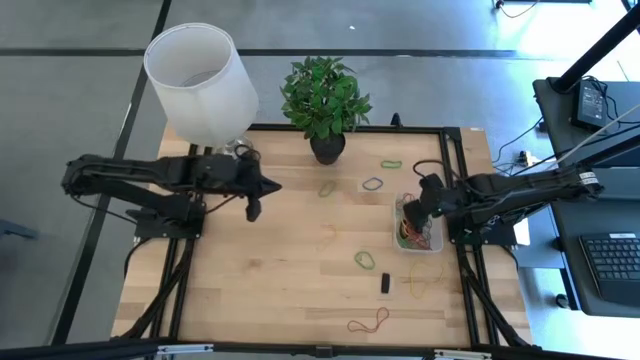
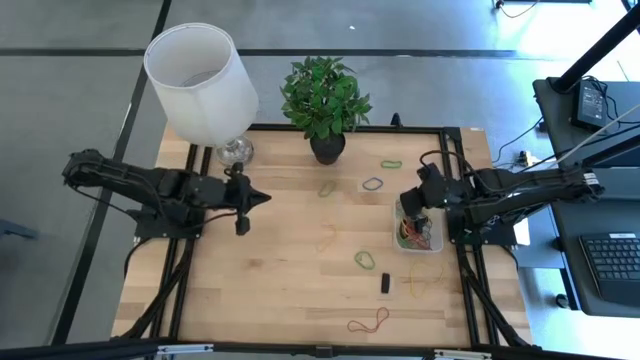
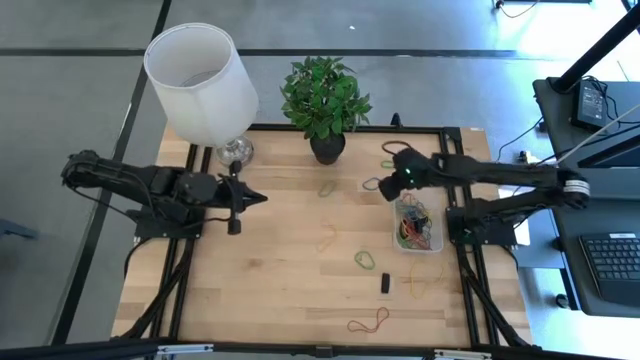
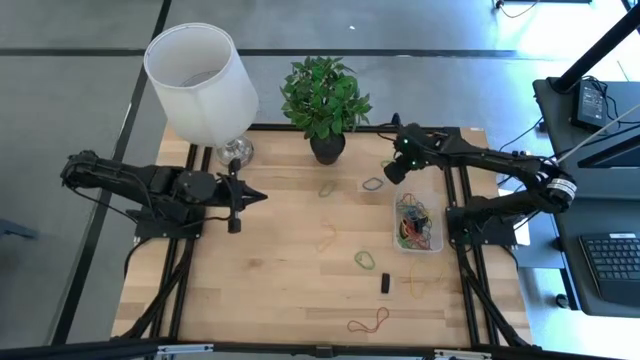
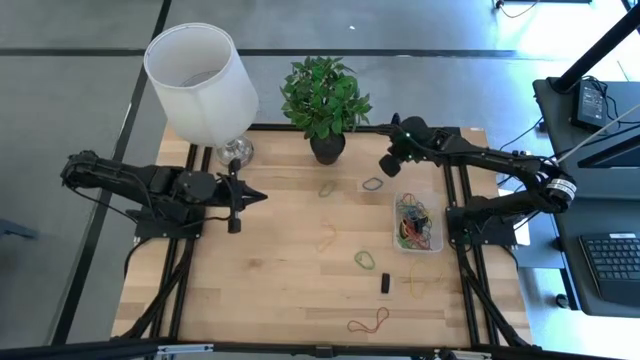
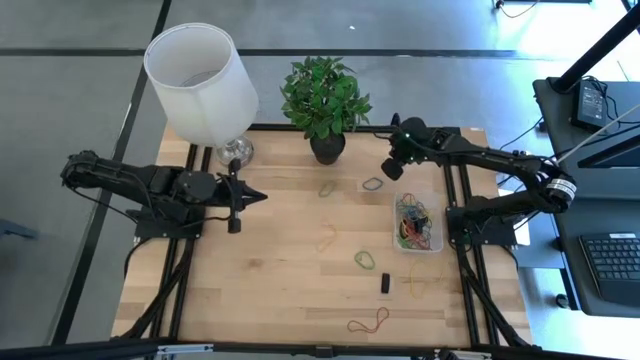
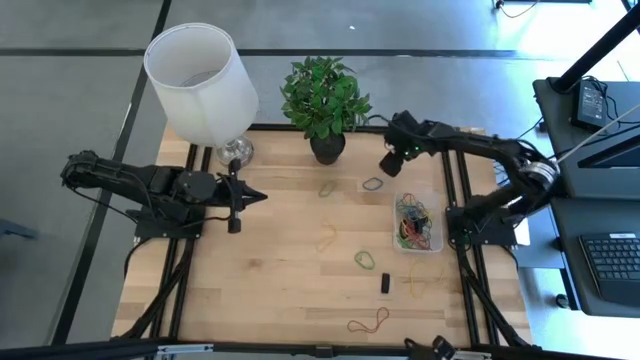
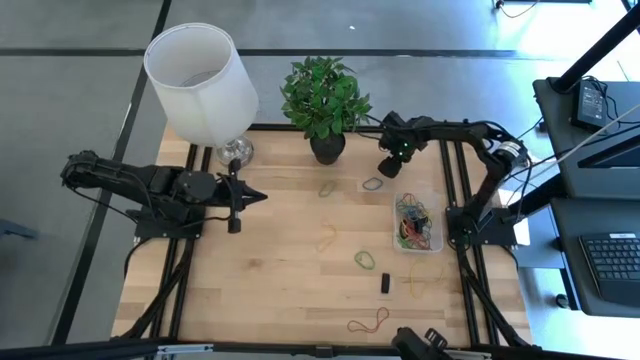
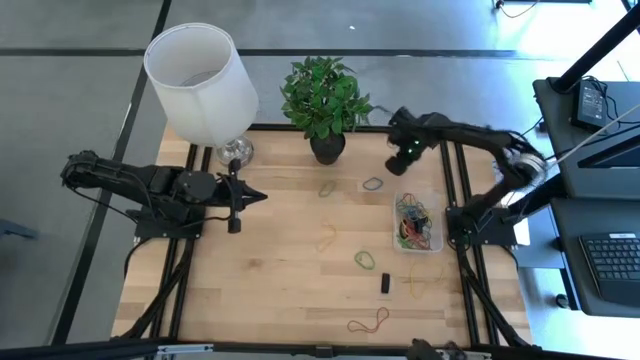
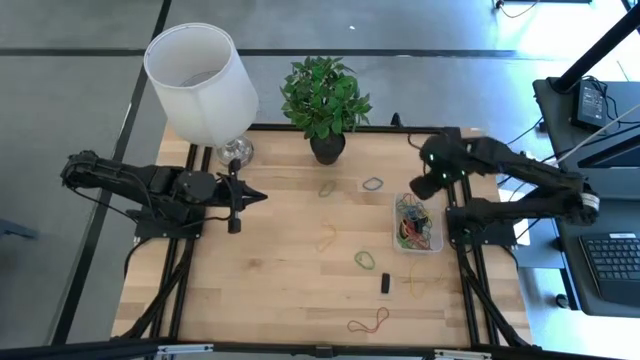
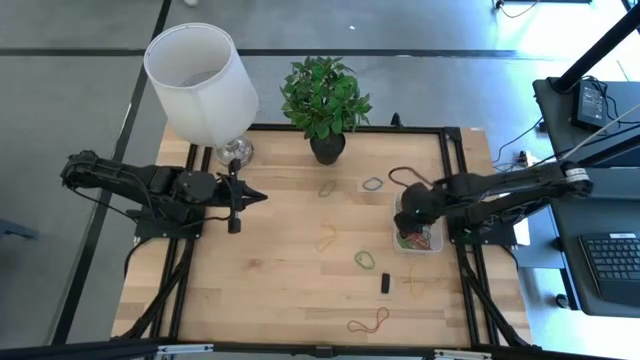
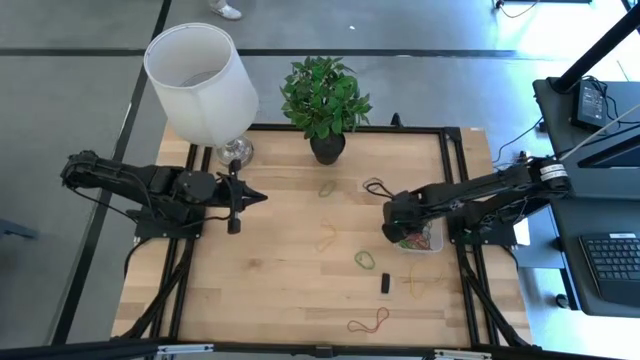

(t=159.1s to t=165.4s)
Task: Pick and place rubber bands into bin
Put the green rubber band into the transparent bin

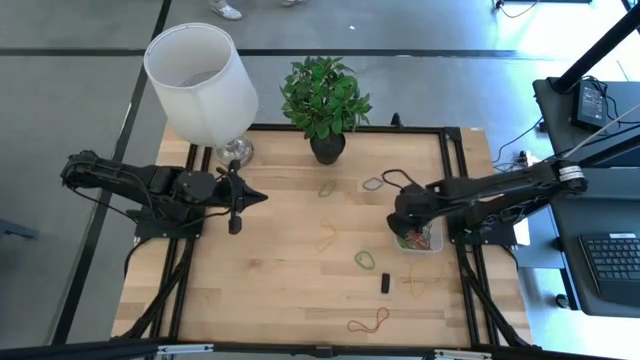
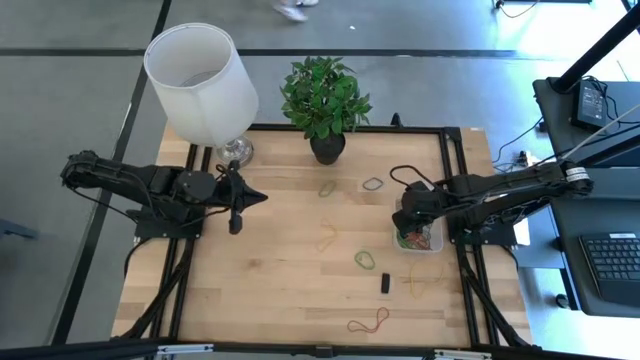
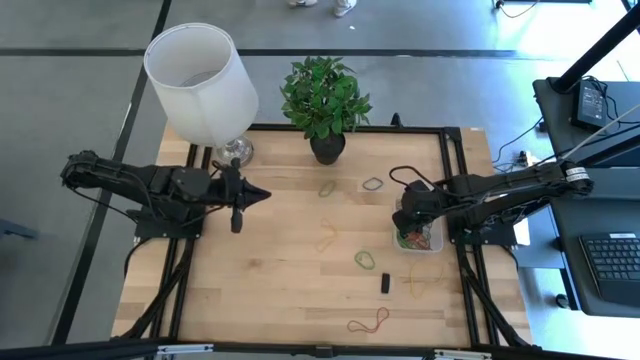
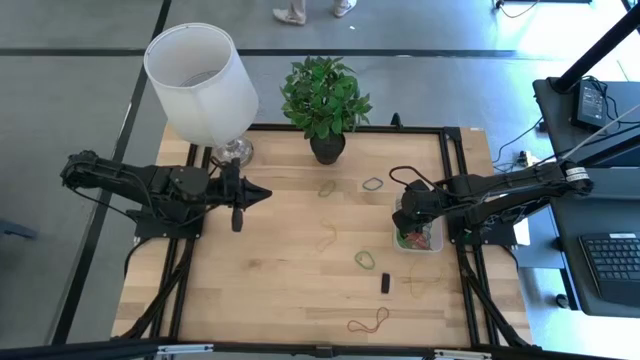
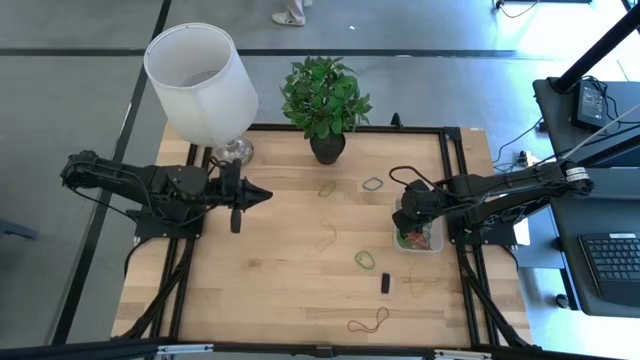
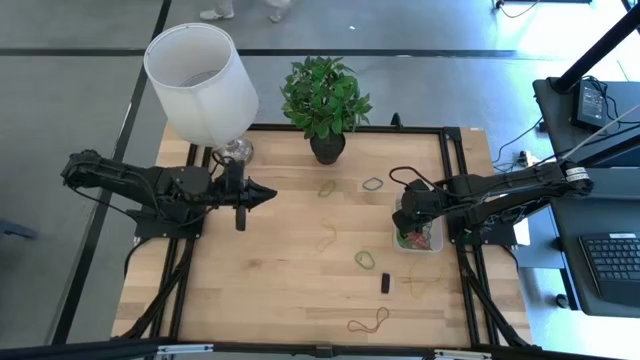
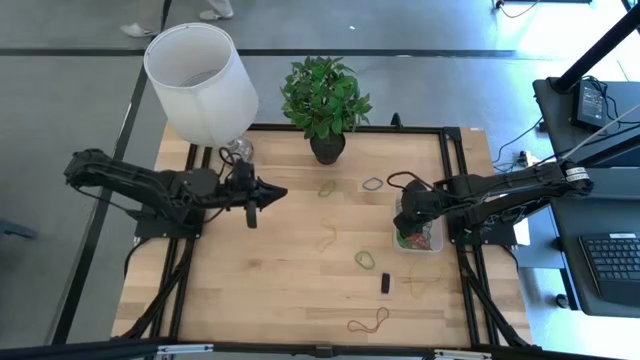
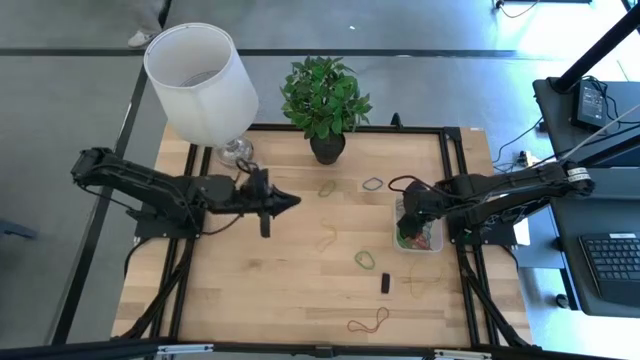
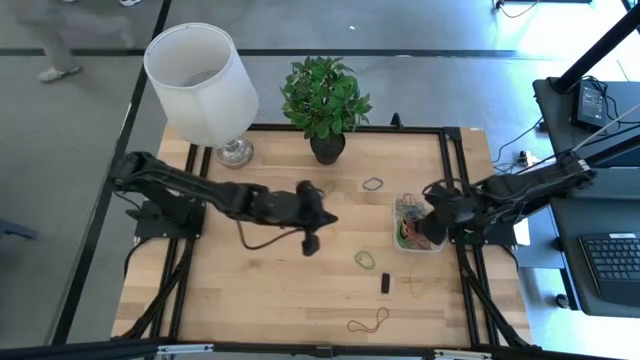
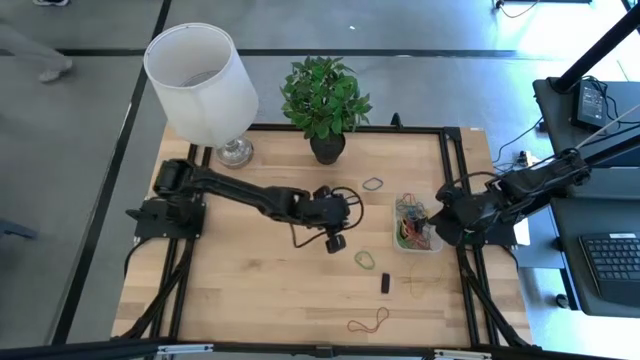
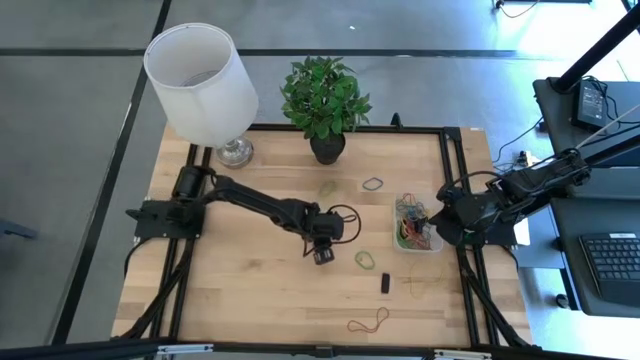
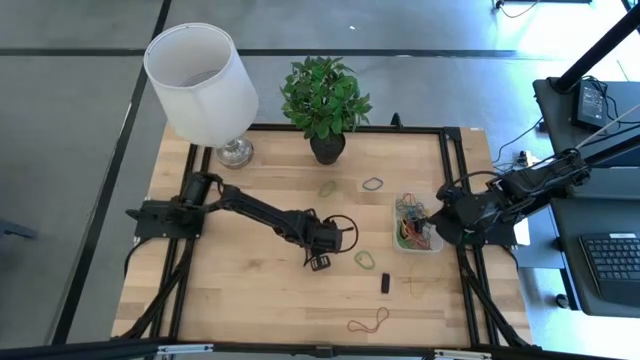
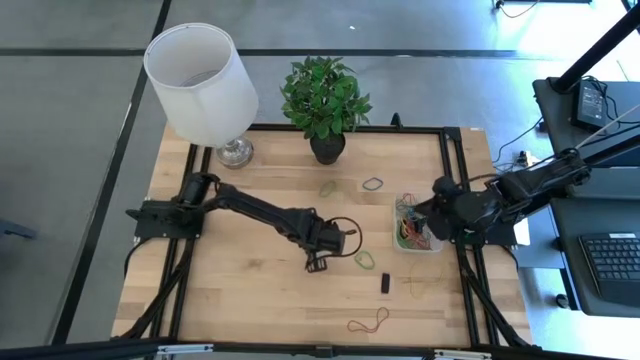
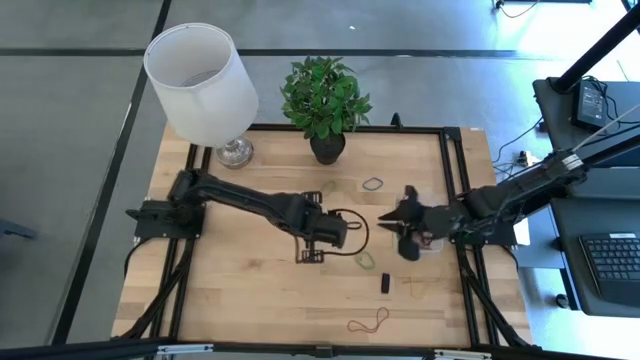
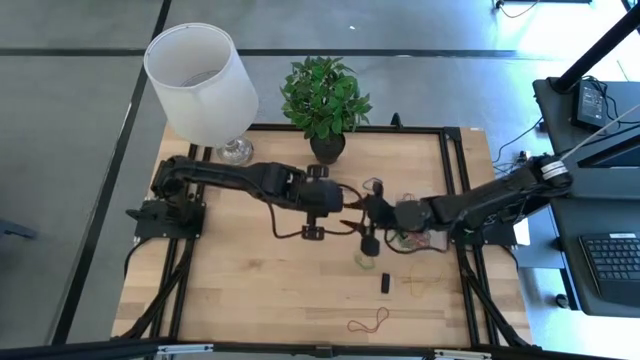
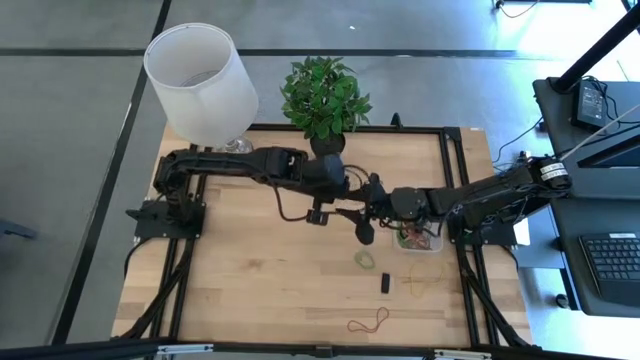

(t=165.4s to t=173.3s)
Put the yellow rubber band into the transparent bin

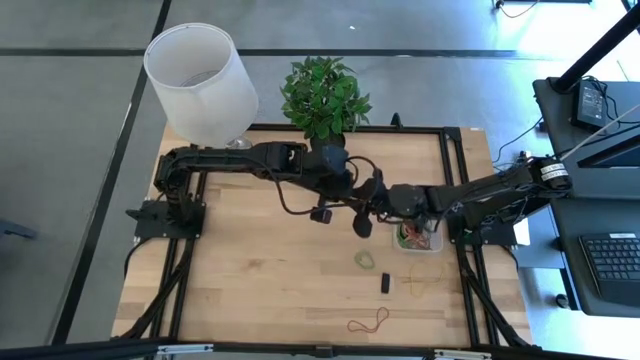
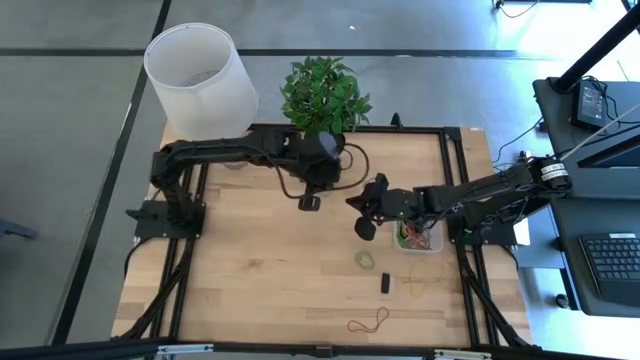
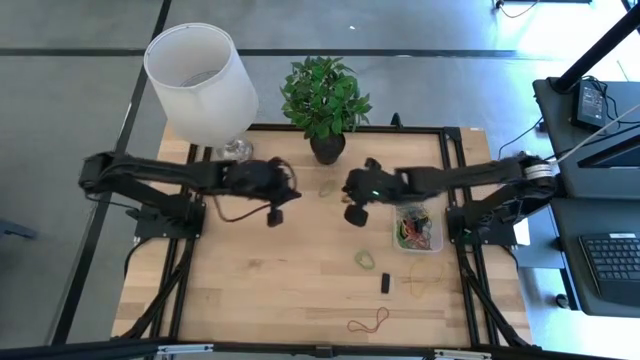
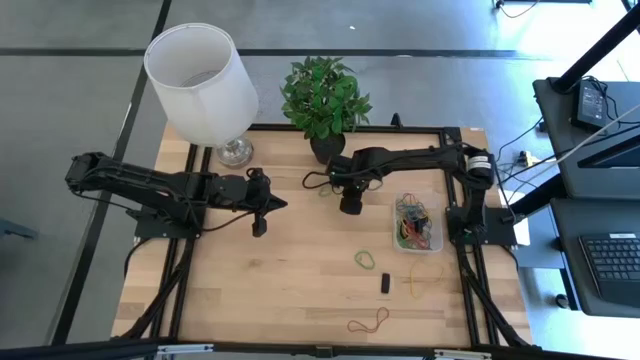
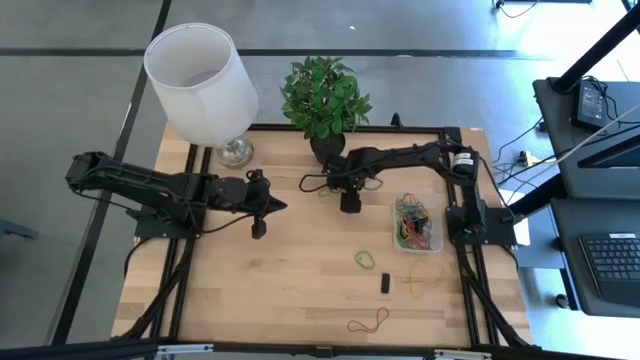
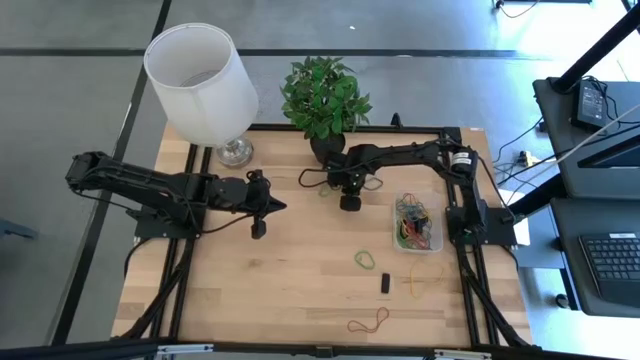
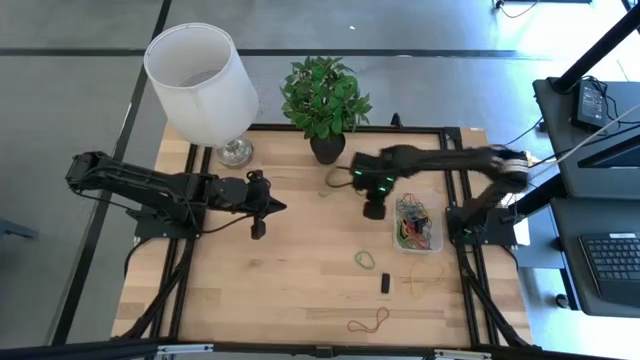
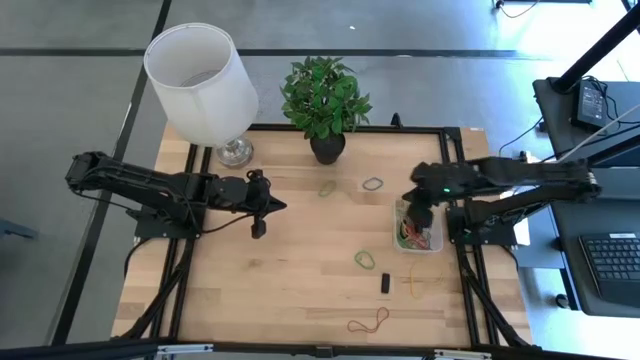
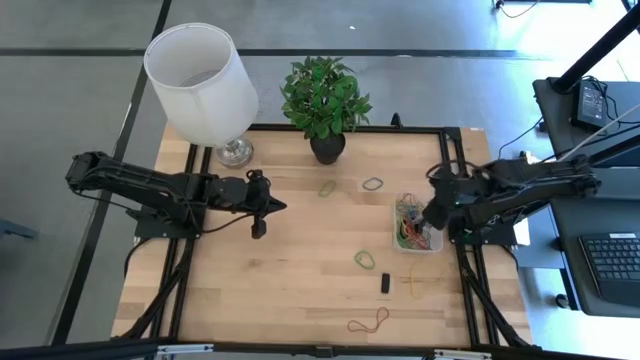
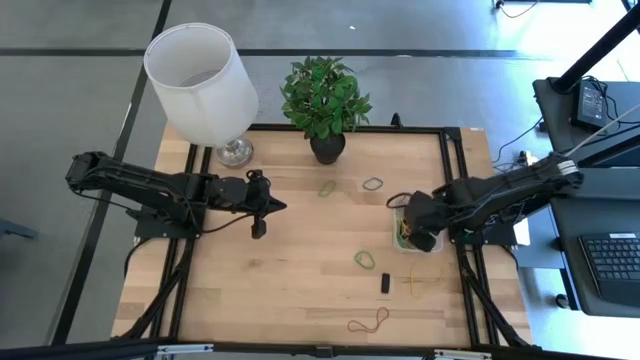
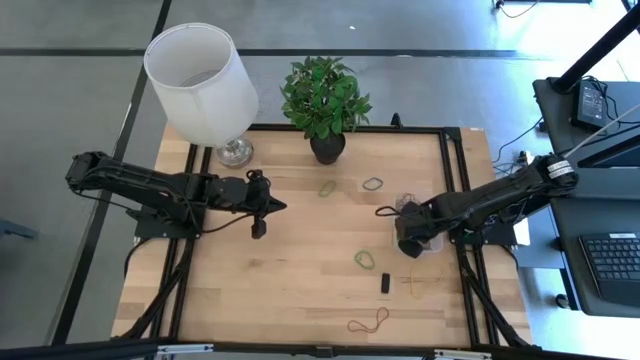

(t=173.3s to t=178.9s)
Put the yellow rubber band into the transparent bin

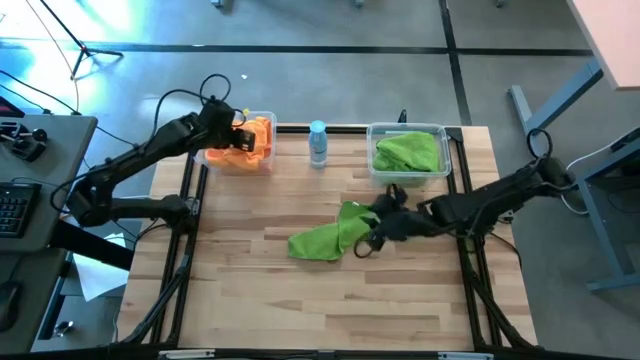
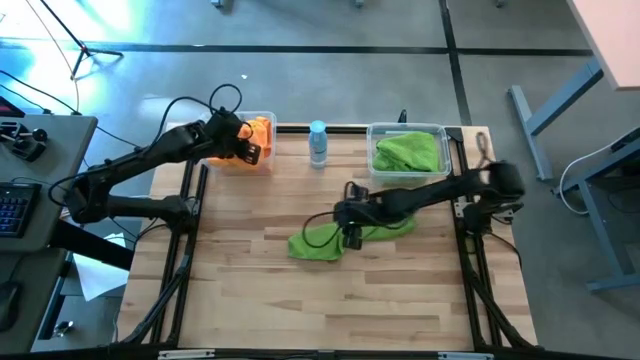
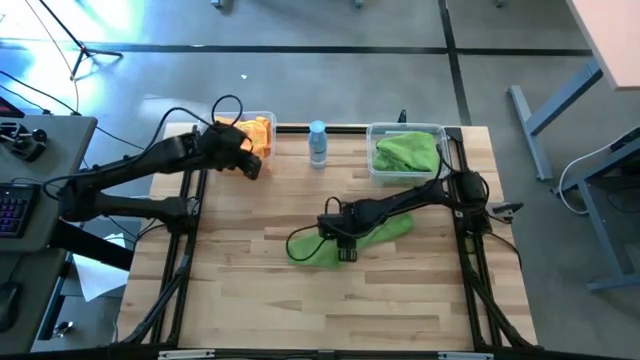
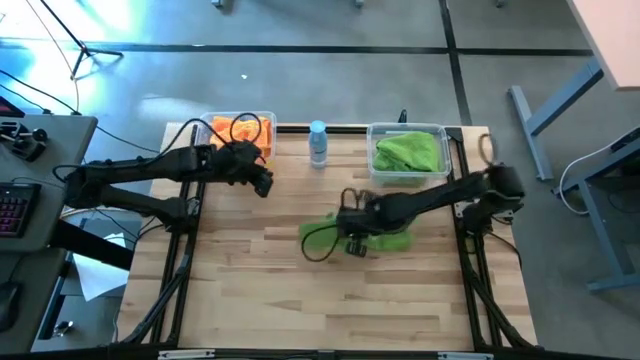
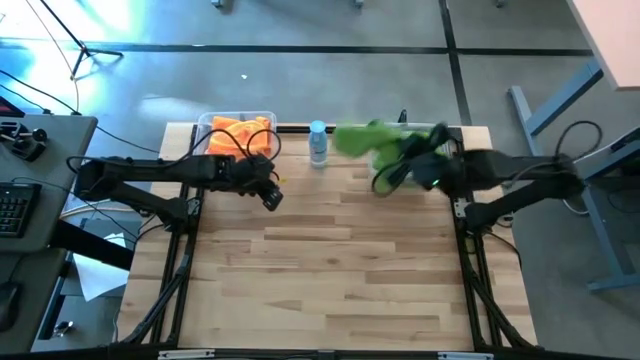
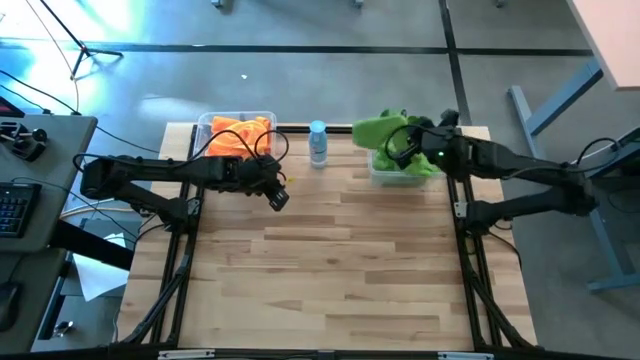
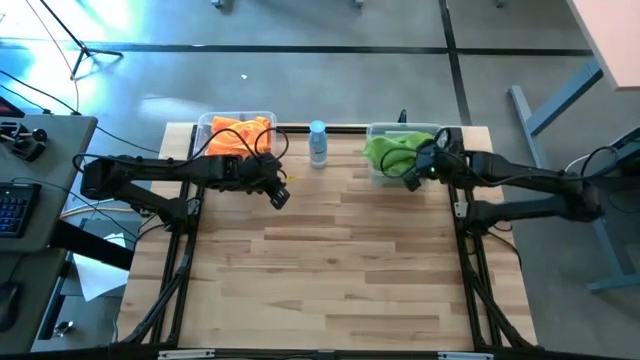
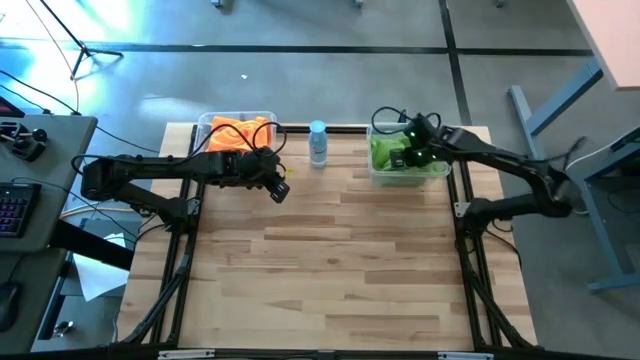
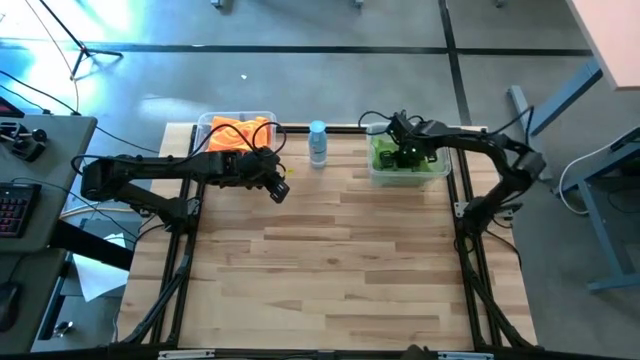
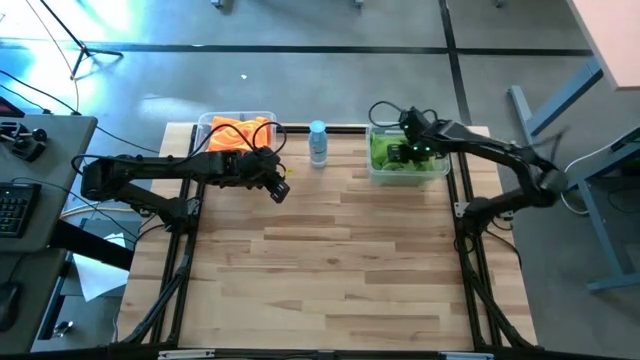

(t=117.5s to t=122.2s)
Task: Sort microfiber towel by color & place in baskets
Put the green towel into the right transparent bin
